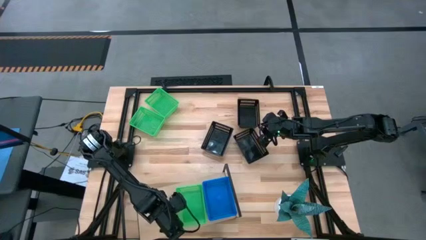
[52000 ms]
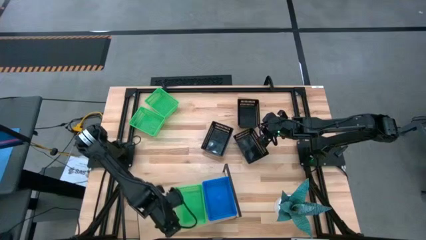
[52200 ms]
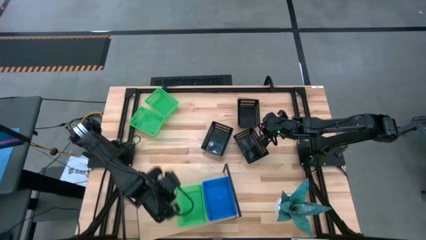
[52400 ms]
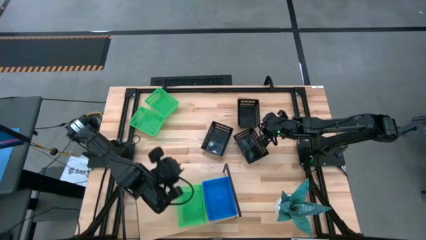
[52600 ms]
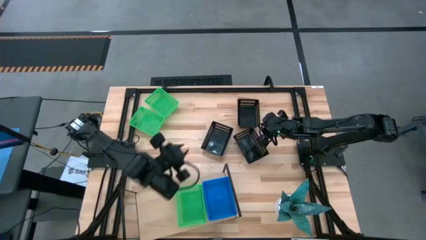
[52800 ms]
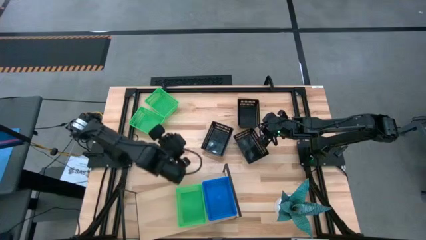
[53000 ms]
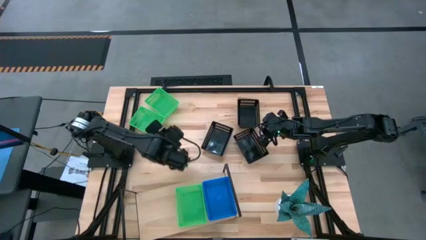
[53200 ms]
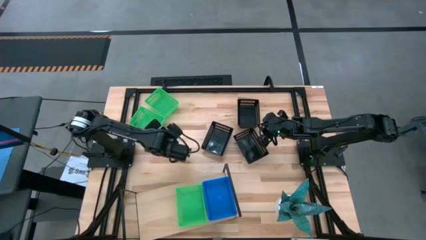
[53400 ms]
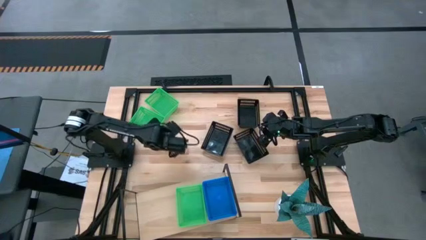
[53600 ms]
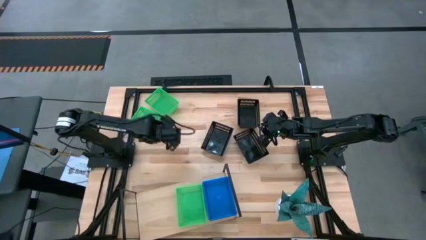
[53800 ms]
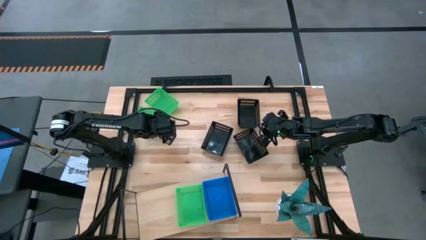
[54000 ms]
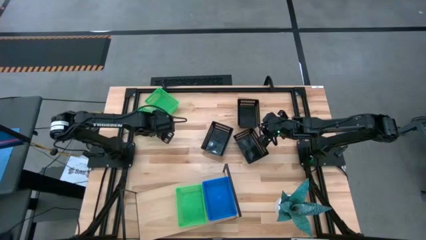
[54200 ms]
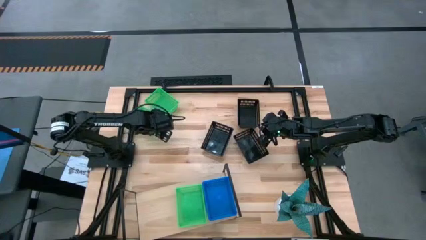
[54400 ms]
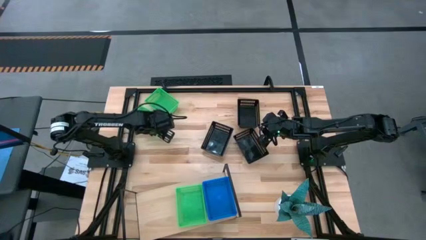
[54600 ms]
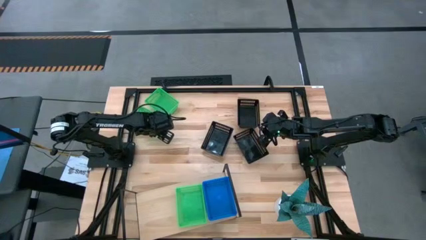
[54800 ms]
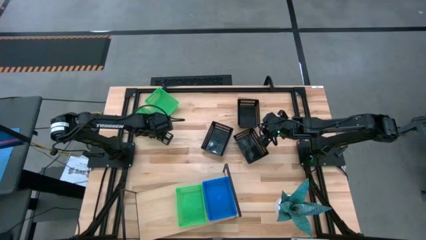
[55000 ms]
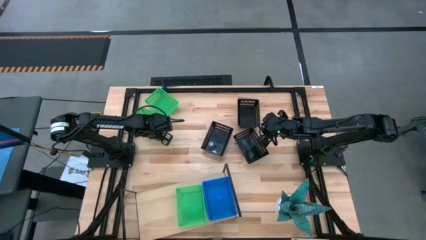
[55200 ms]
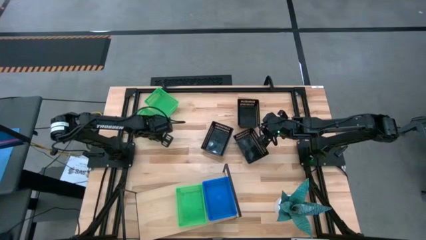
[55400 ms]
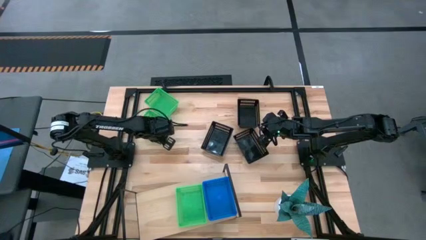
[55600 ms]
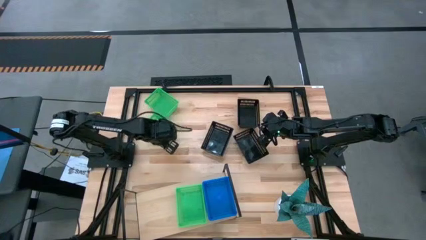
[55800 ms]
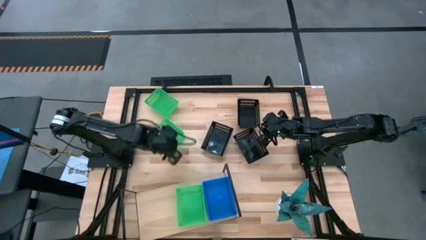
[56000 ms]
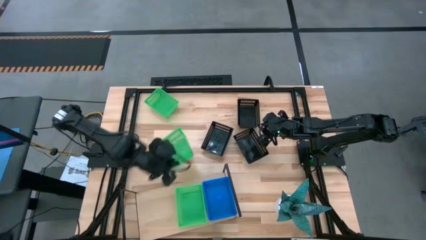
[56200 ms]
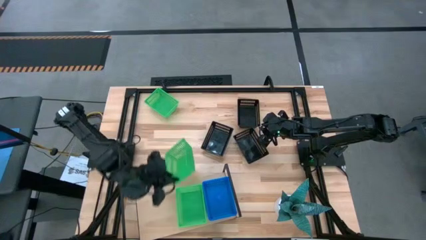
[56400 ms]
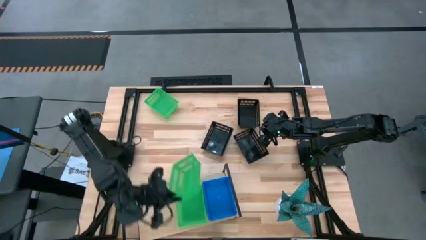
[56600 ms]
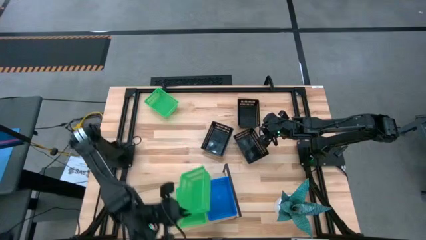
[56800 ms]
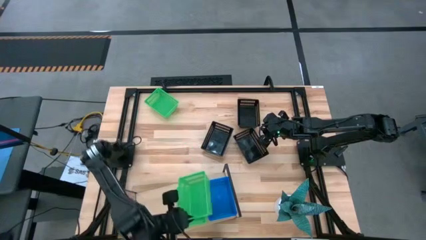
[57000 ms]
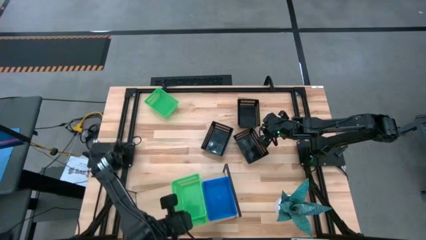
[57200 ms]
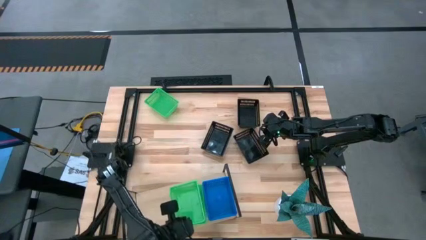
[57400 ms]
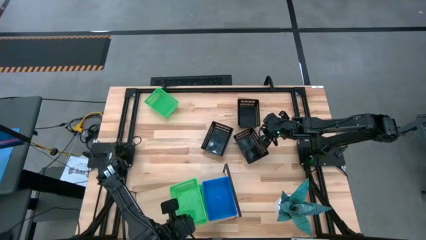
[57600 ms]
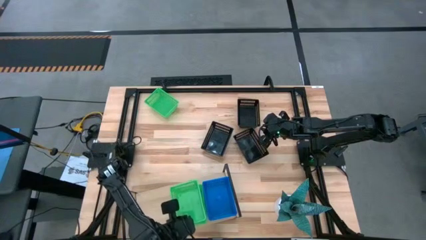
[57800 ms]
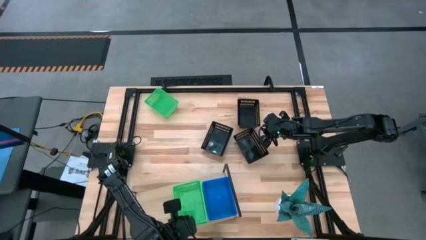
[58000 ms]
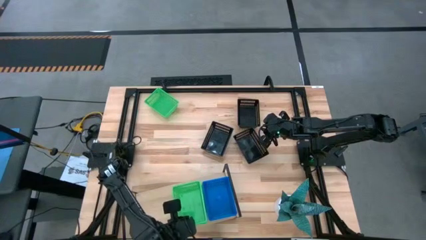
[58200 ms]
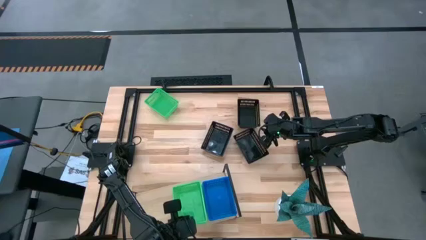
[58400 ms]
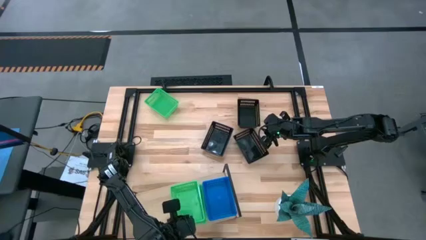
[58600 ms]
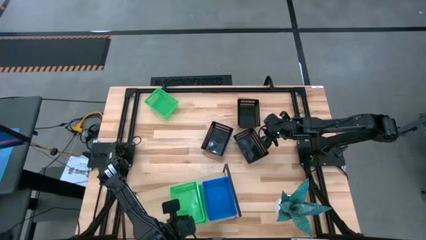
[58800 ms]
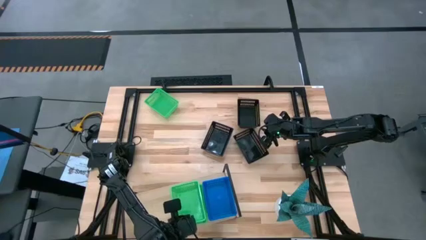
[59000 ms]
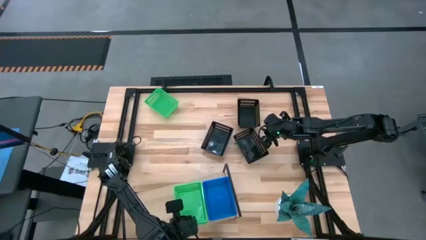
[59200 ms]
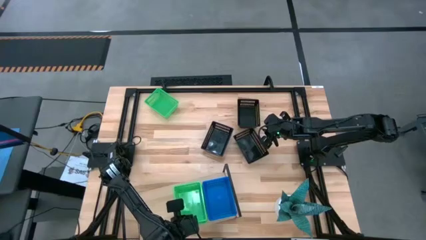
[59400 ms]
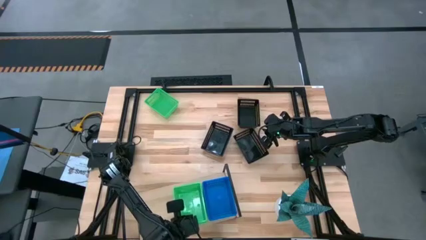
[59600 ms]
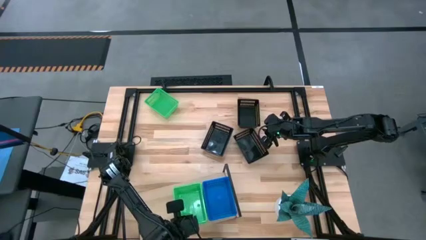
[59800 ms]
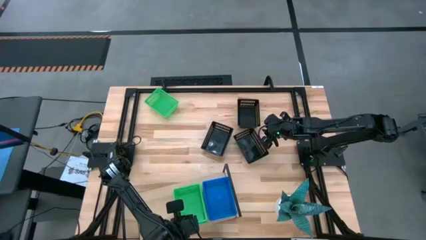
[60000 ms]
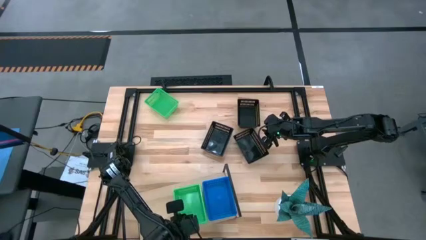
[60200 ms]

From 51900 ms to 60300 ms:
Task: Stack baskets on shelf by color
Stack the bottom green basket on top of the green basket

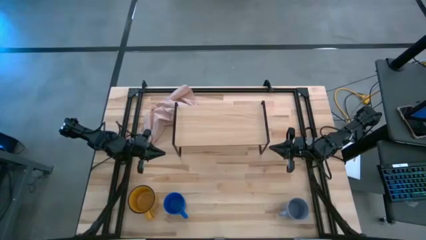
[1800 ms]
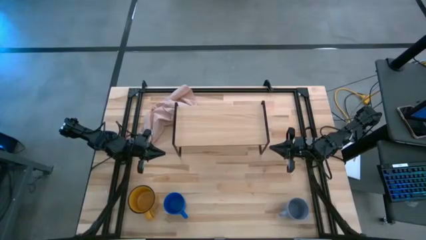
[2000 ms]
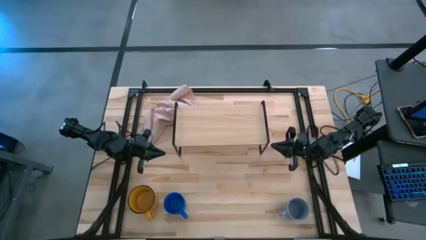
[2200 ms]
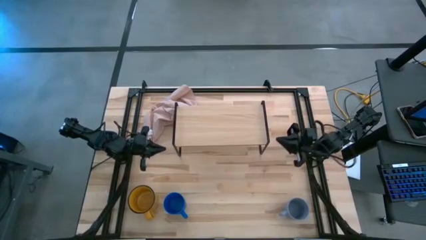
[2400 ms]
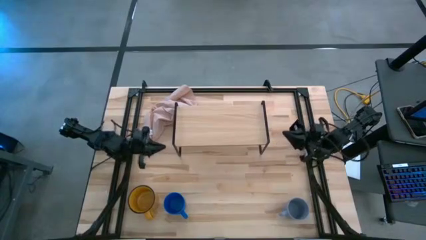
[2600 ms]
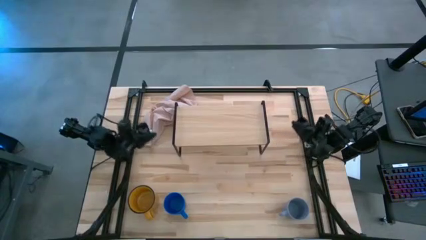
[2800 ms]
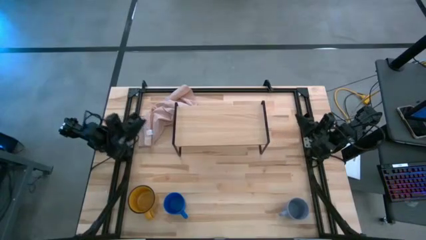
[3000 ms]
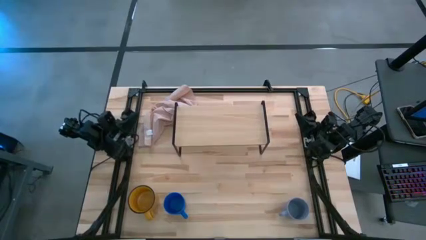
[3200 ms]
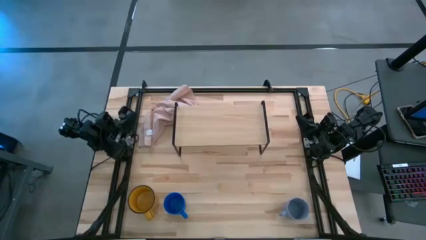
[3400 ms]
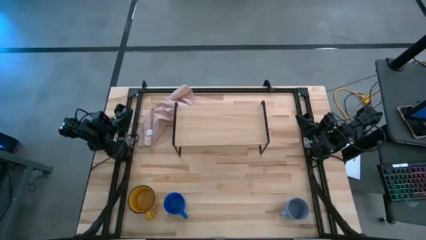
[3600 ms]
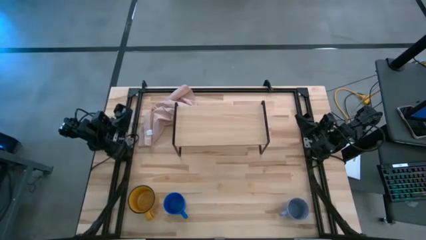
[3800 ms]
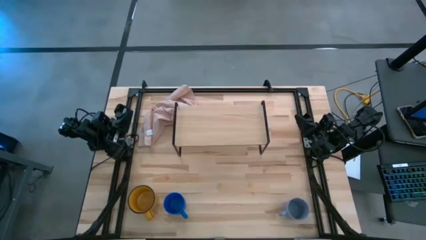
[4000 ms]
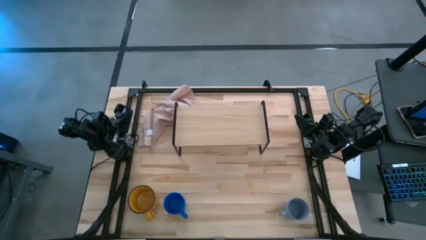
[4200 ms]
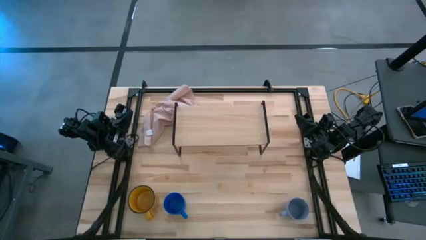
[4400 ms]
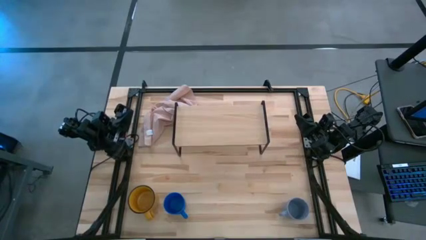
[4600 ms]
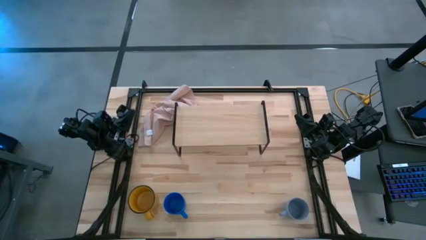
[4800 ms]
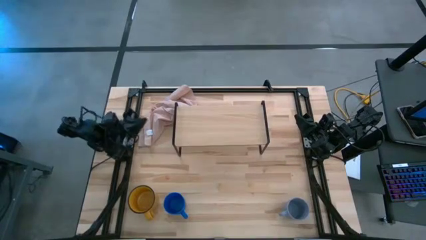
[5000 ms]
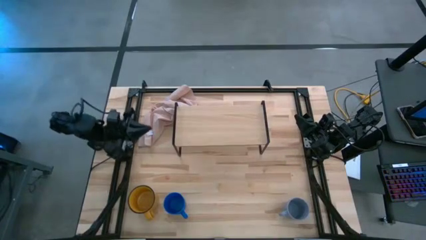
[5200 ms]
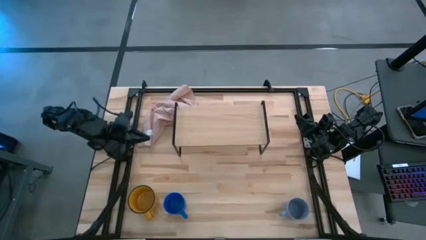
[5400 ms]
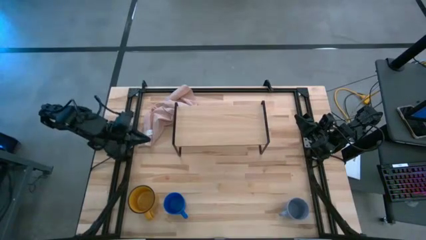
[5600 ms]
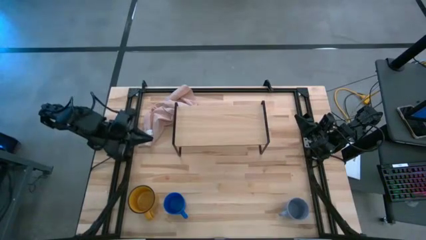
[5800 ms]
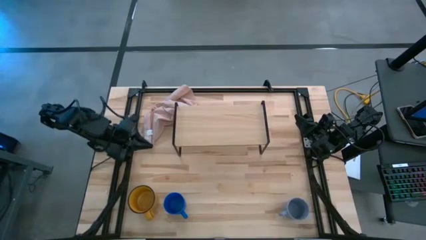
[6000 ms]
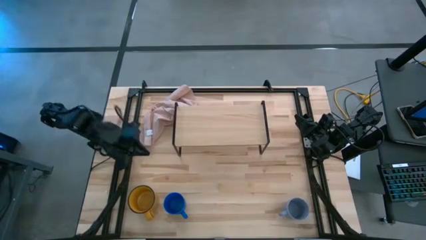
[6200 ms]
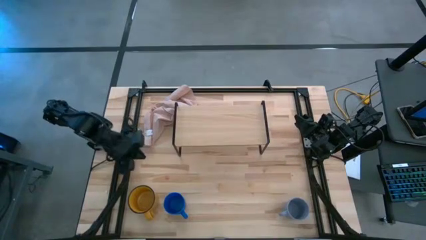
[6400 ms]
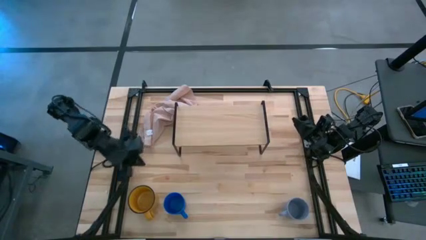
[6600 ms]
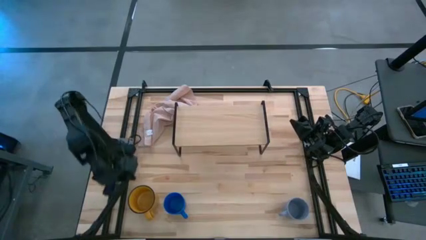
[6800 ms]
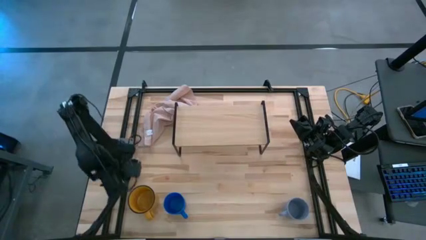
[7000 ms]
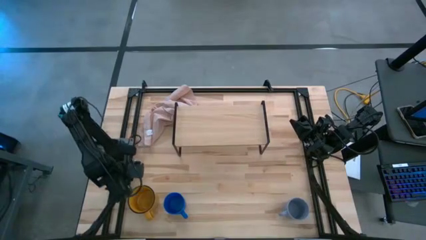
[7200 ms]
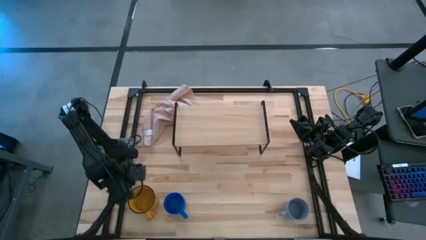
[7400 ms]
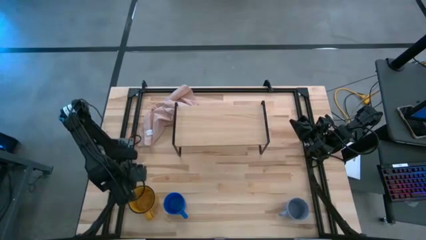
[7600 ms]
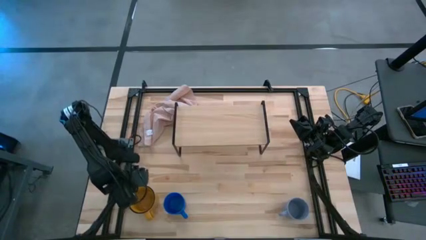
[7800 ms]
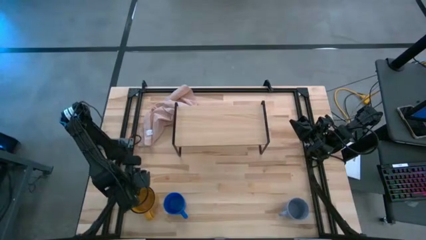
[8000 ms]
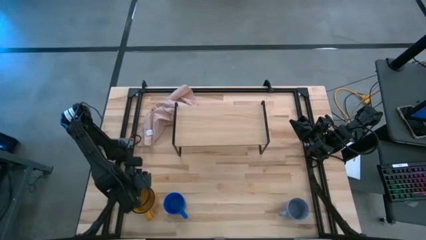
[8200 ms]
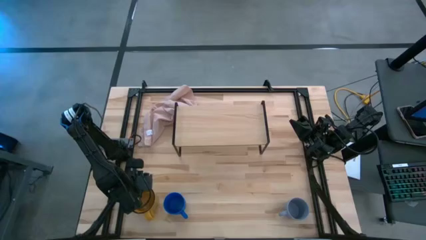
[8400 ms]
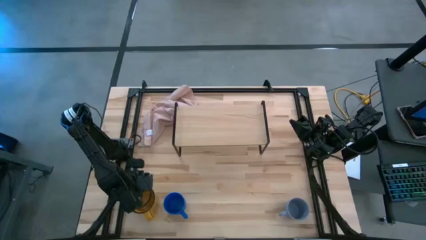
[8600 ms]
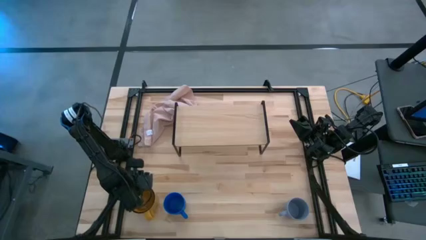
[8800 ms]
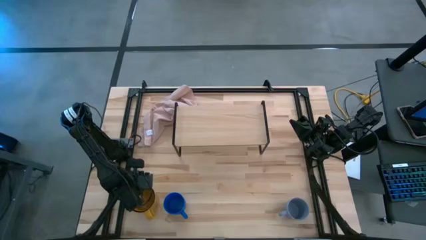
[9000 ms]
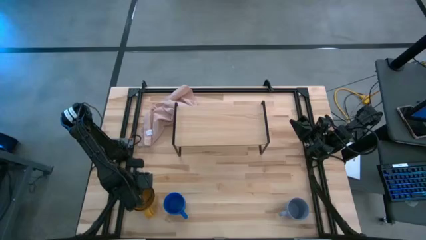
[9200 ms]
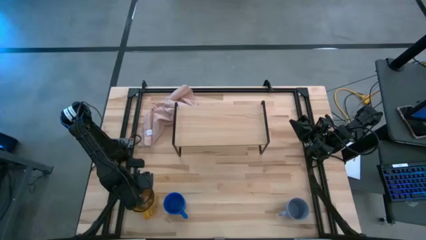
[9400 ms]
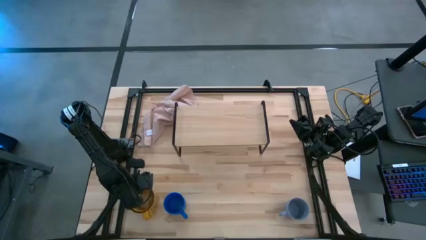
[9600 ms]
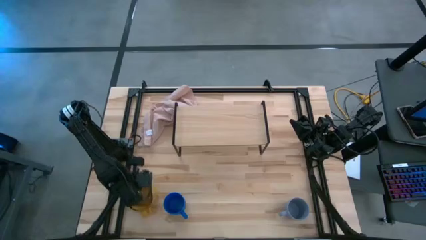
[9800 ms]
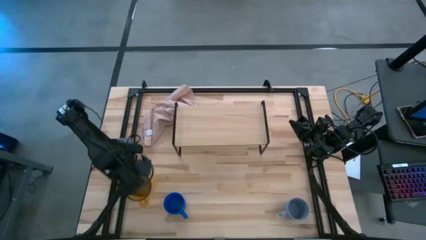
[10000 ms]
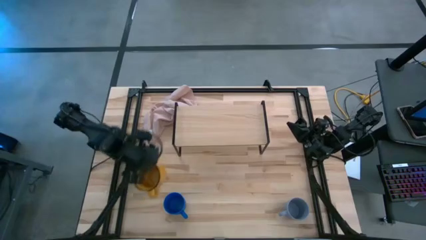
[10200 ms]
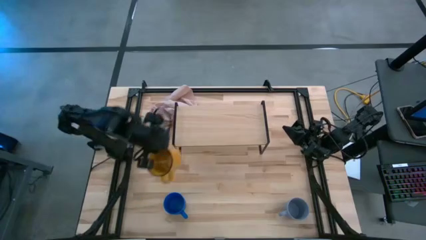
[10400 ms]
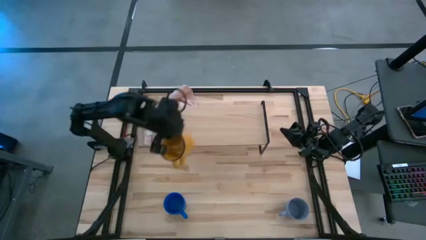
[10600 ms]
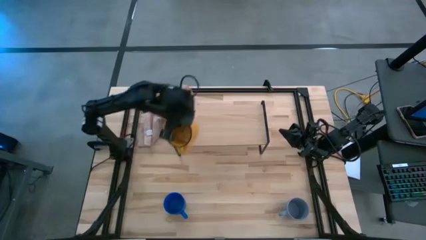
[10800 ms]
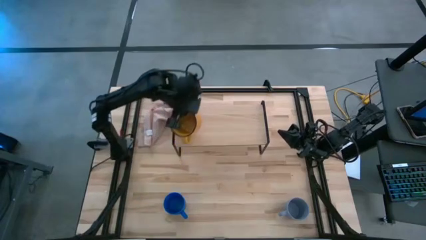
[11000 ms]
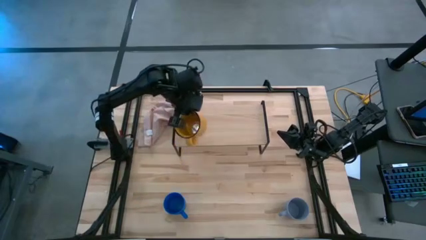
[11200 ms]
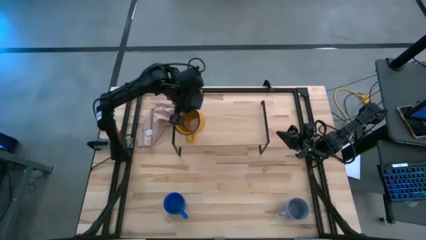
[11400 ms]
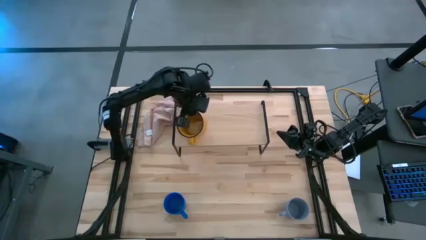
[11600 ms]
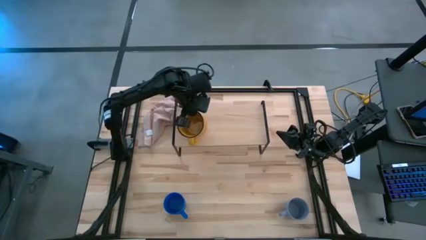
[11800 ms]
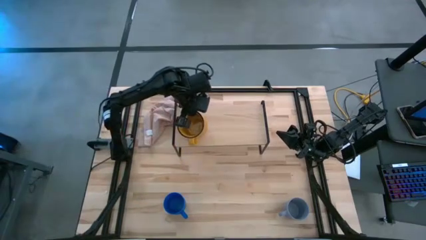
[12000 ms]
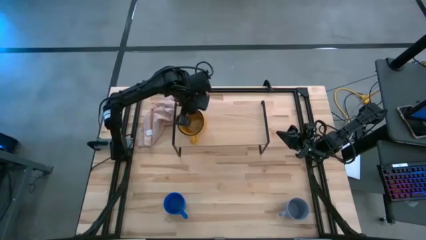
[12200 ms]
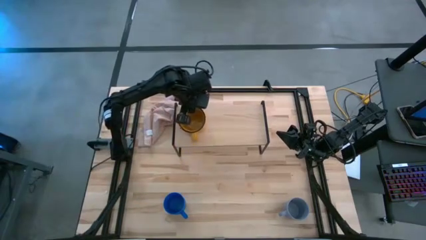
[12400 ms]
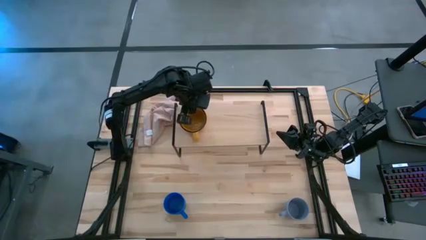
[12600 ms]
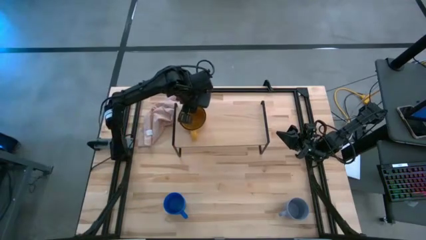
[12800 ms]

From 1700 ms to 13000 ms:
Task: Stack small to large cups/mugs on shelf
Put the yellow mug on the shelf
